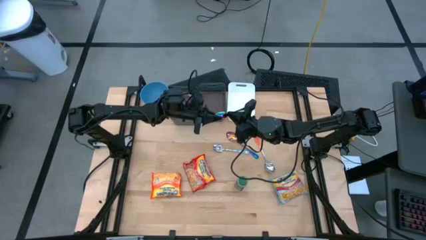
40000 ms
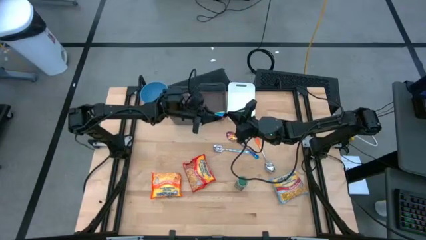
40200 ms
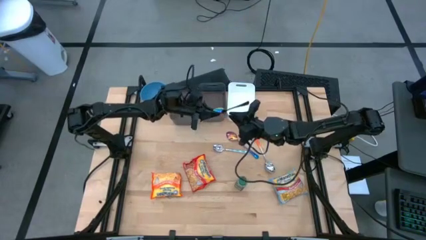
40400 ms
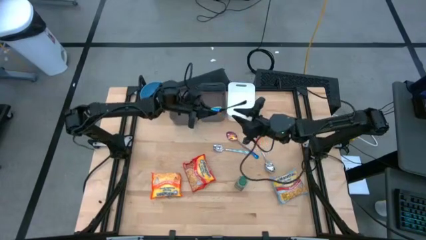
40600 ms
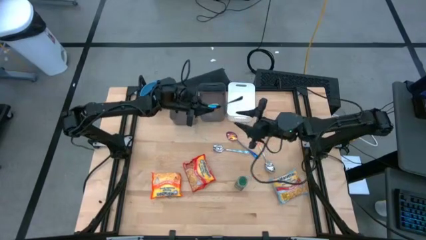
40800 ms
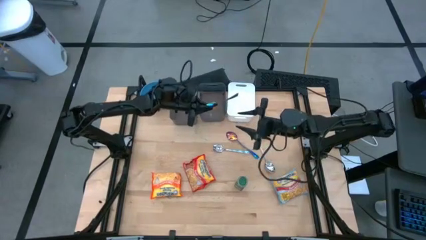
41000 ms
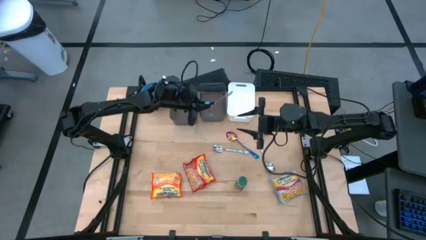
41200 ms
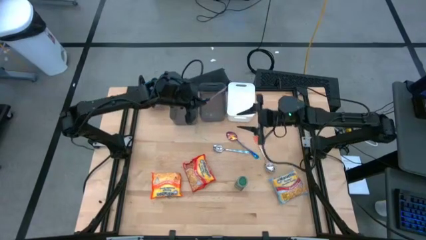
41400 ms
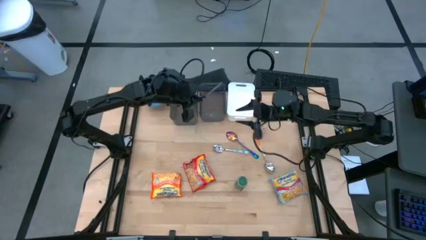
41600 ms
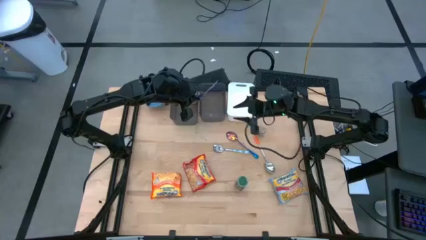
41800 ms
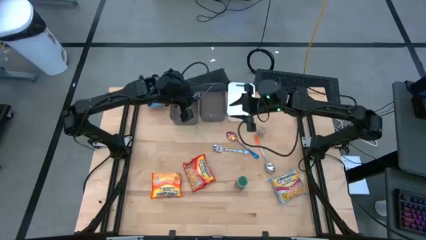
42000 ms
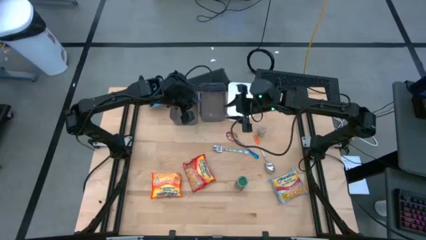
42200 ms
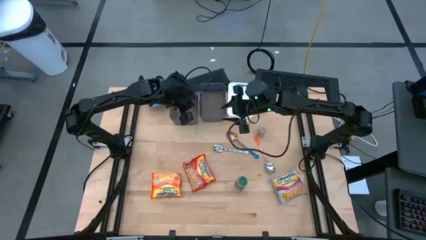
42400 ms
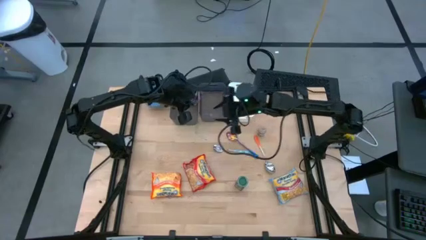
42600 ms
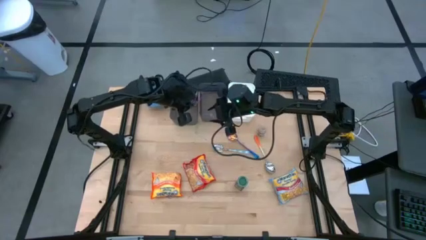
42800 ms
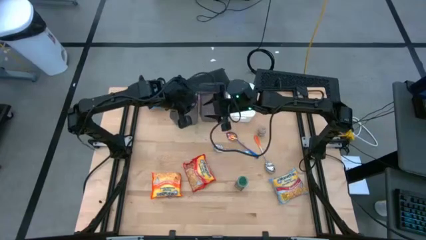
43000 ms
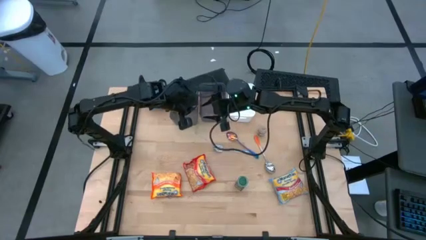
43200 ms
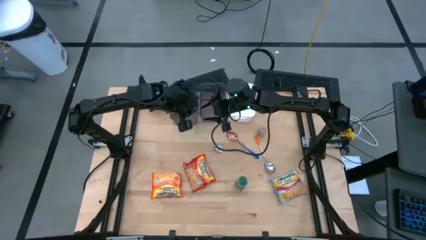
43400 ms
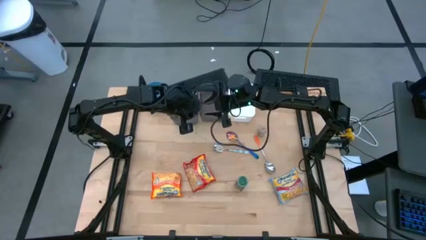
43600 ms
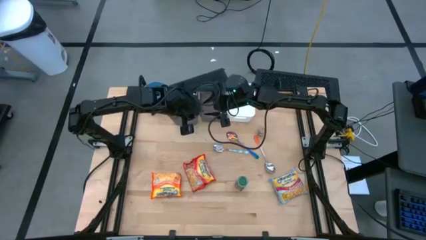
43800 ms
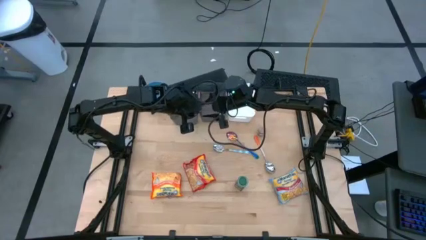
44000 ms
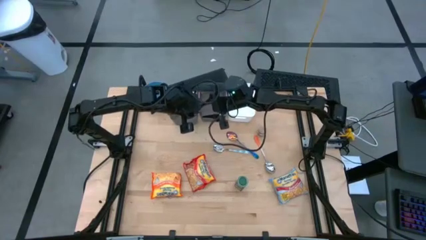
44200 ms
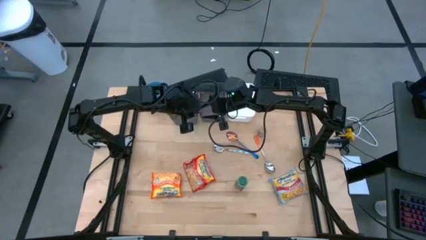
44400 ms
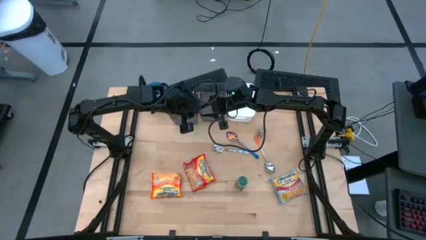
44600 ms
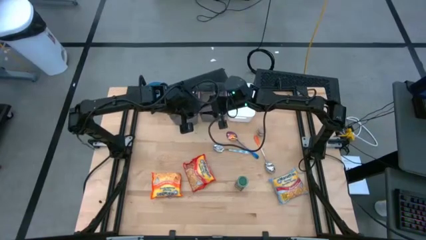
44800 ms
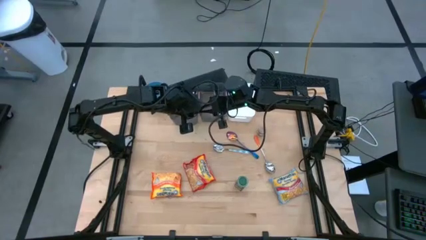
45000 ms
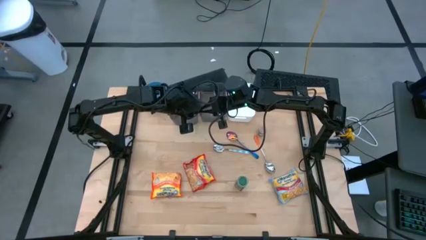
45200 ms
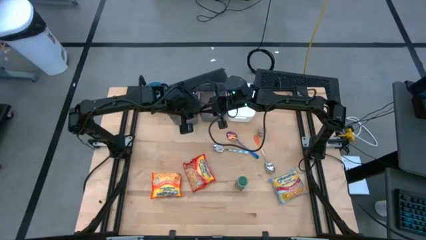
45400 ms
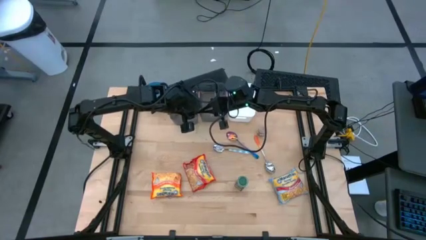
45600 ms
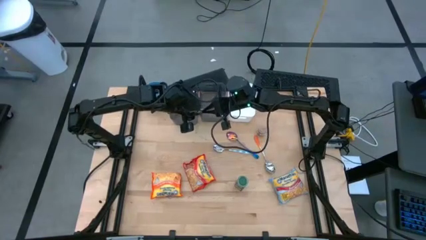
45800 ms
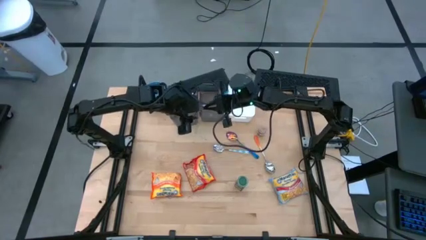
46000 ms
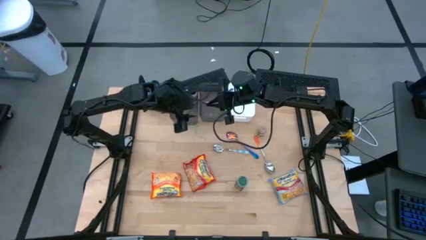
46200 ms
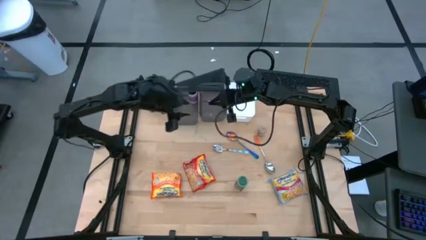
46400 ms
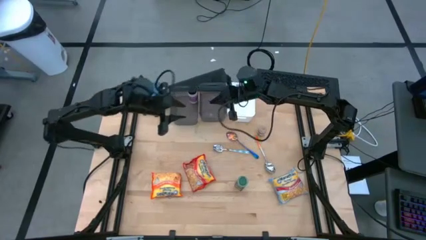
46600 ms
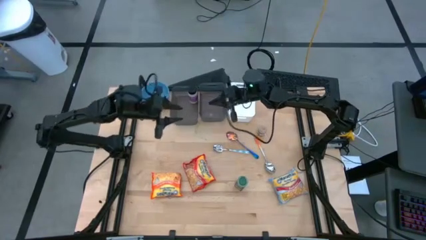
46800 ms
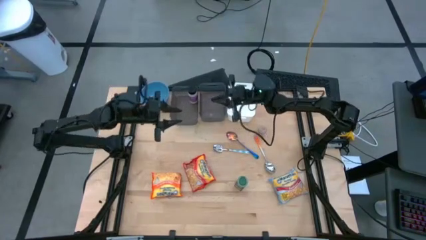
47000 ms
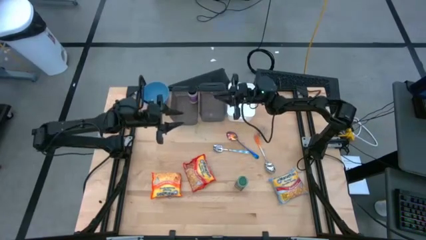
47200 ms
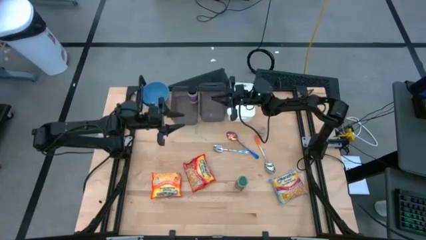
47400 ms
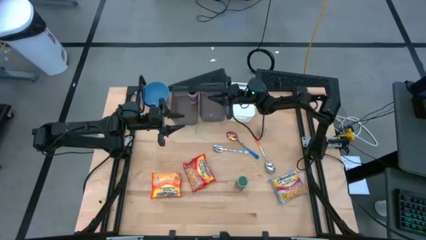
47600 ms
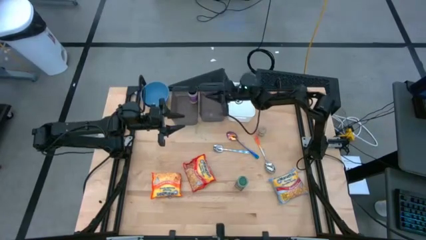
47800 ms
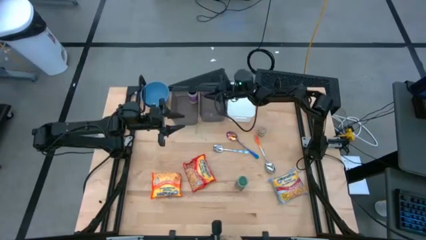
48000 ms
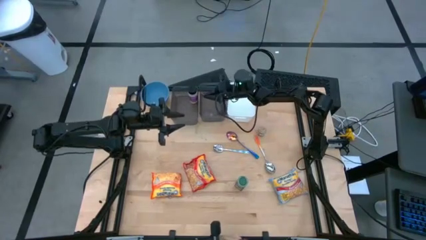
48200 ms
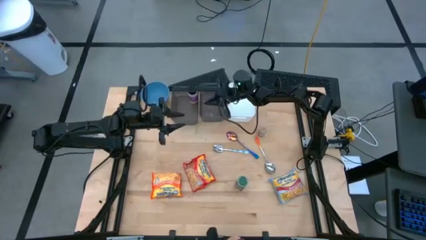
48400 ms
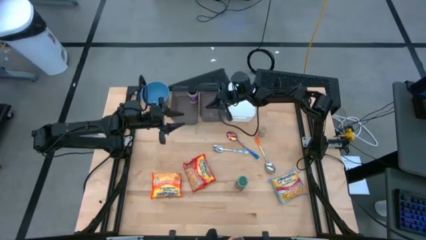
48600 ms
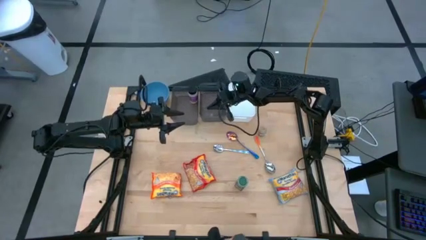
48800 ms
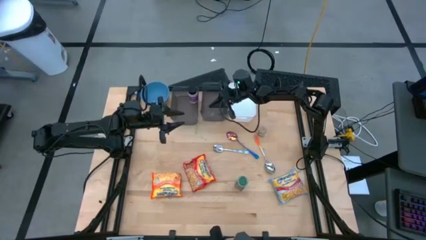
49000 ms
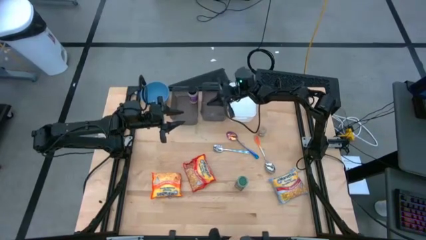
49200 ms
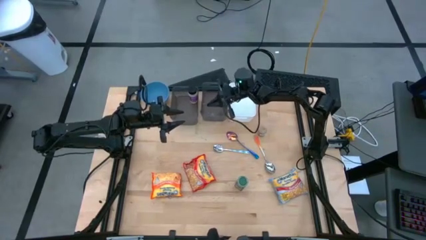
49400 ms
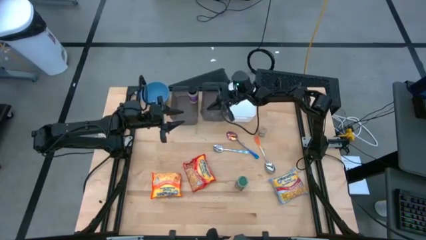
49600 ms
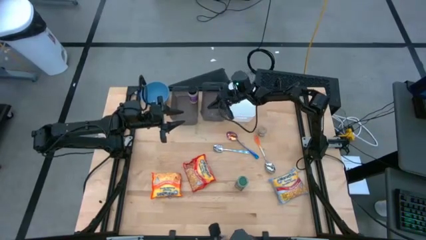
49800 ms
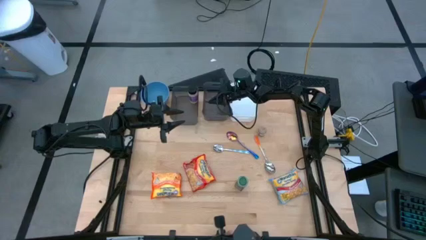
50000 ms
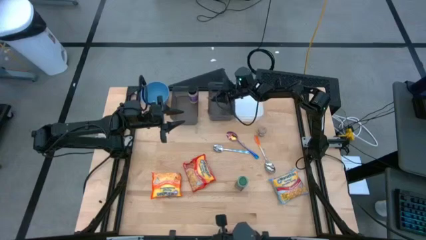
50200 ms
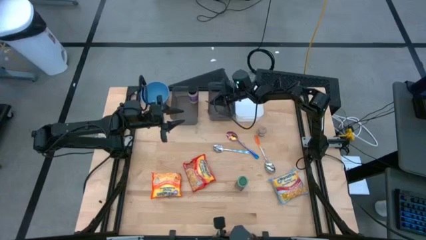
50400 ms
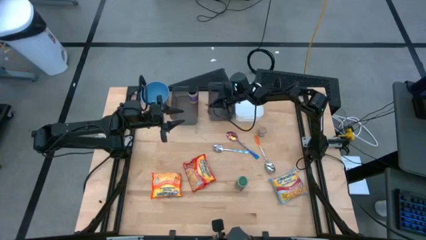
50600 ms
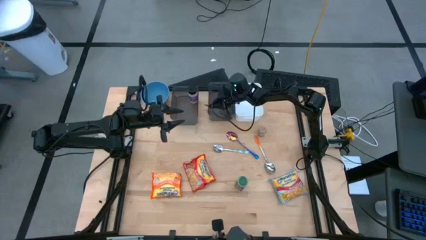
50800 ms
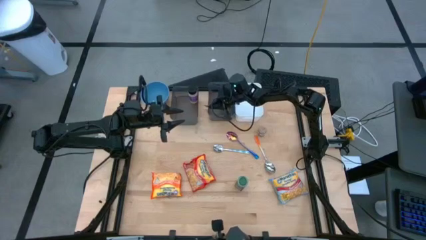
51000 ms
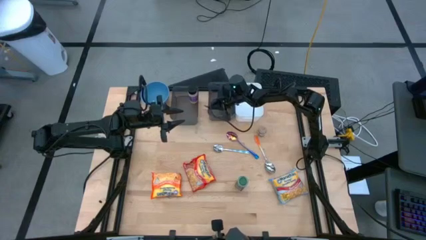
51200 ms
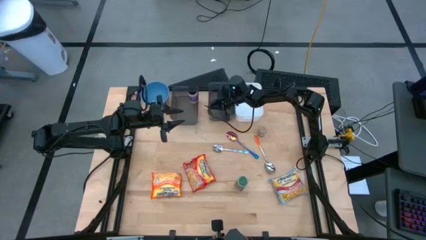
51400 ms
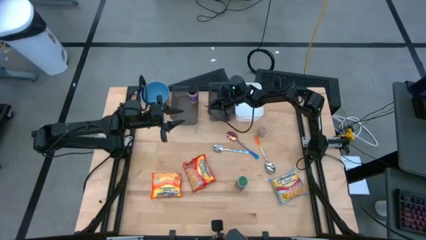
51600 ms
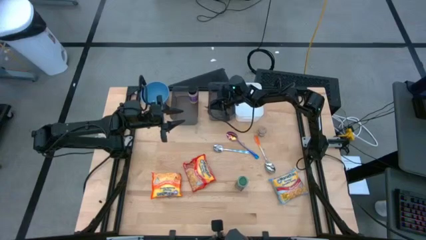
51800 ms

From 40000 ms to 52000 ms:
Task: Pick & Place Food Item
Put the blue spoon into the right black bin

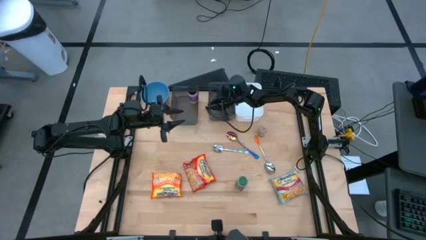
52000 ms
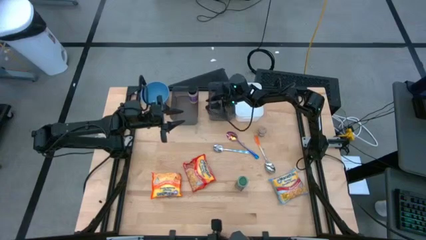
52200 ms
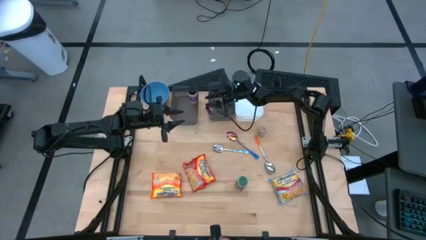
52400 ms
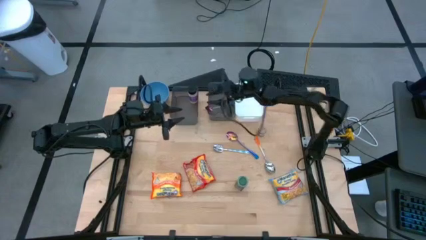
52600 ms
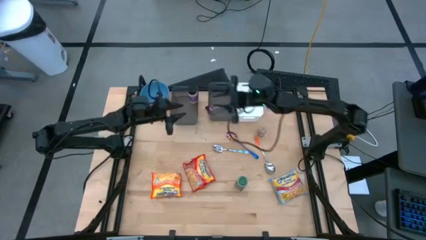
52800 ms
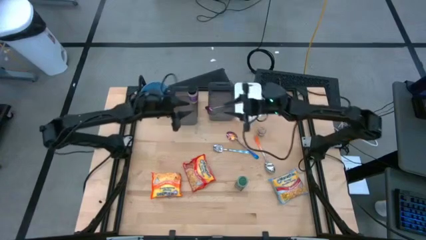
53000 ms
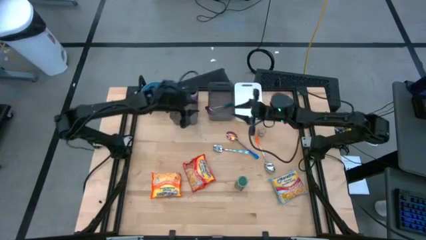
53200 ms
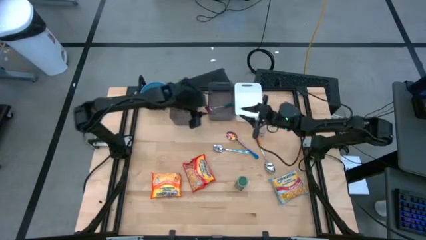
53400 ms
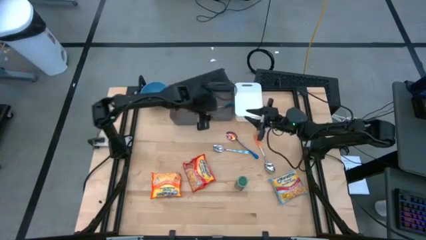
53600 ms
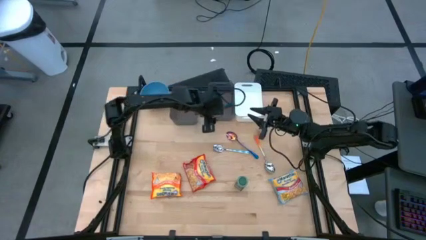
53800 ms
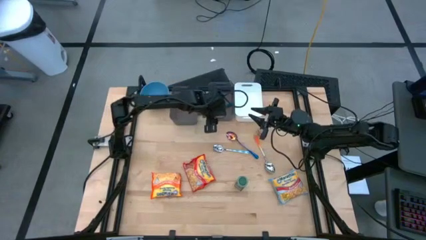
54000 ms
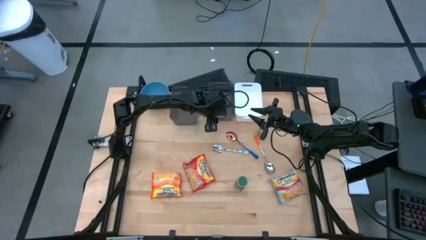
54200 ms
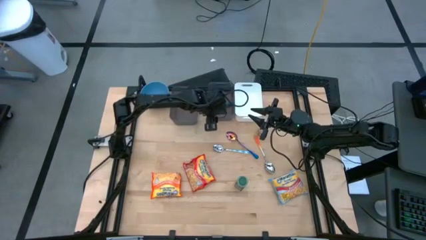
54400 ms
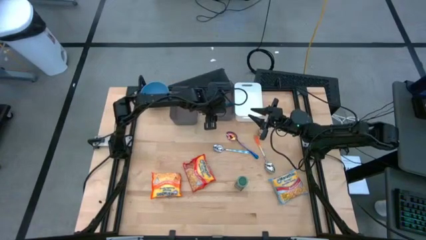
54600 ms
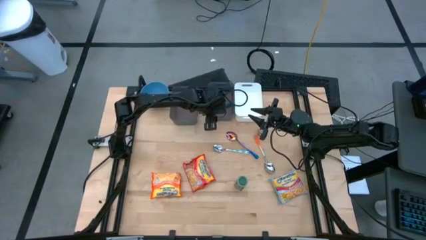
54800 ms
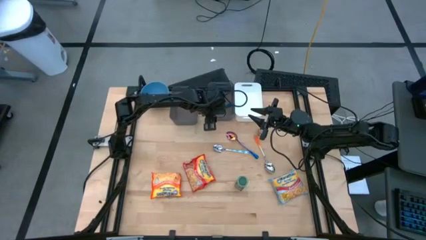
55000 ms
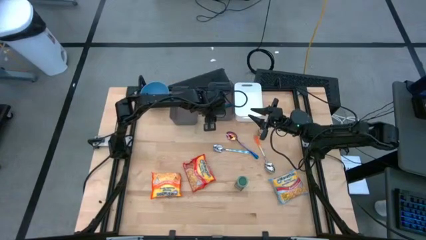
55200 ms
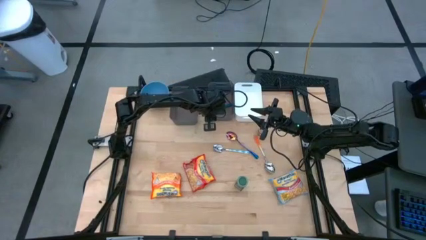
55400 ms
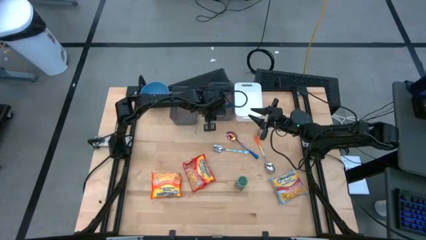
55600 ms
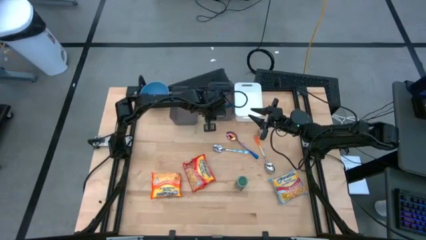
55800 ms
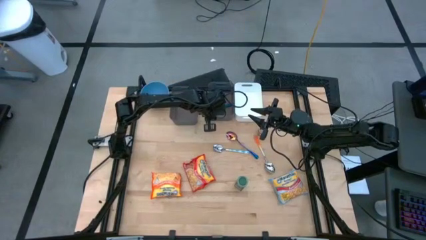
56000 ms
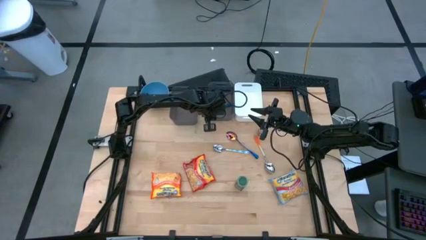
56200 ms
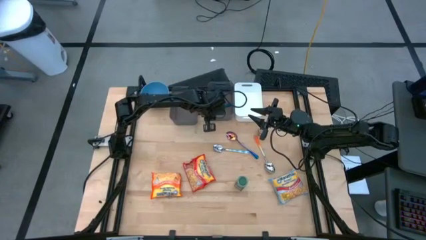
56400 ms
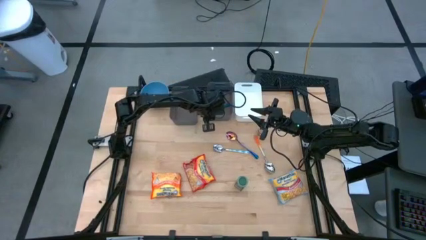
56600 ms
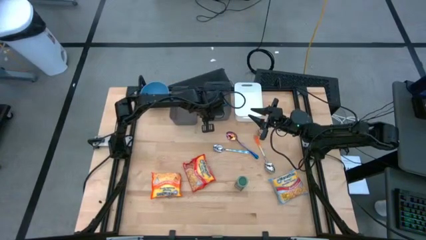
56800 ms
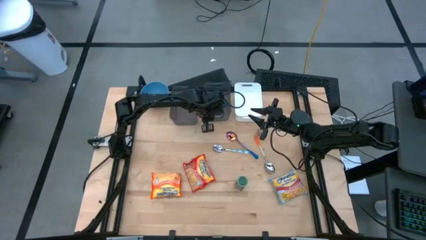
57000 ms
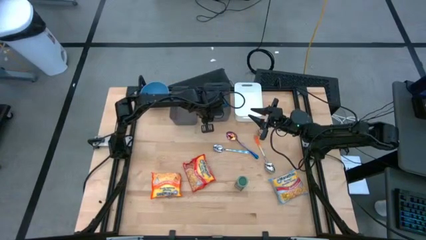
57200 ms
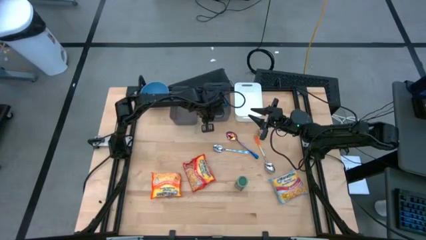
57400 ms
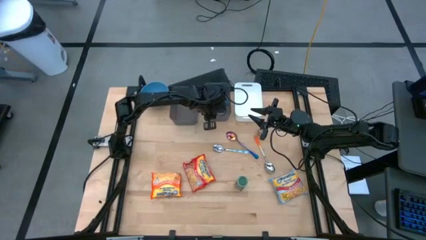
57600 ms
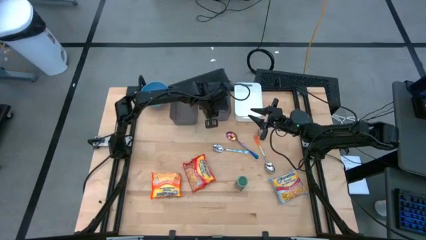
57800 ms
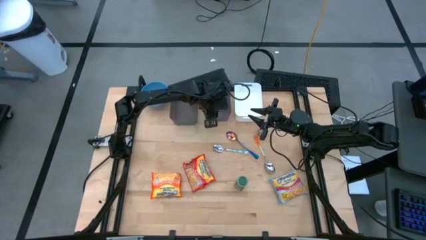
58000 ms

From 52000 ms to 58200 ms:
Adjust the right black bin
